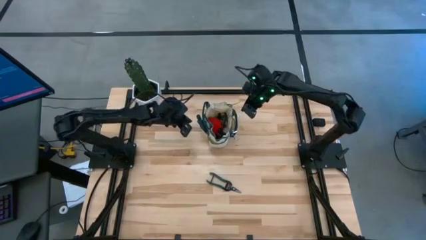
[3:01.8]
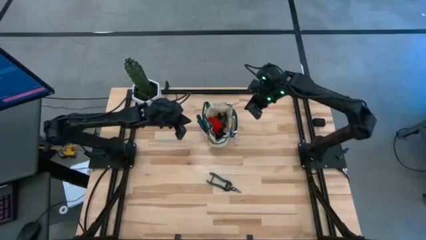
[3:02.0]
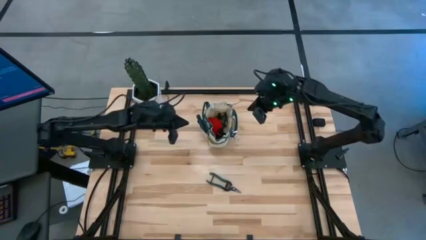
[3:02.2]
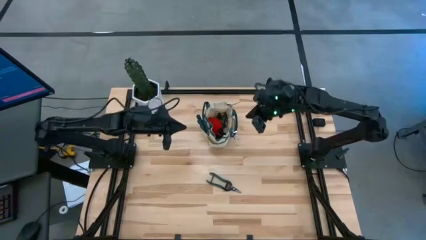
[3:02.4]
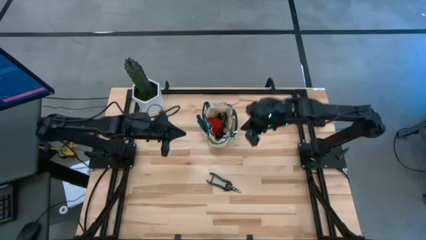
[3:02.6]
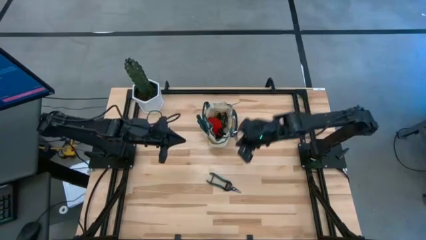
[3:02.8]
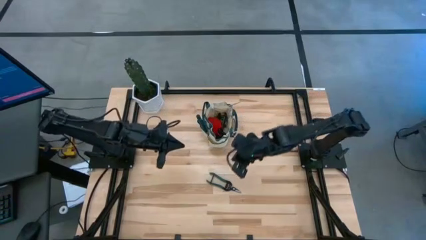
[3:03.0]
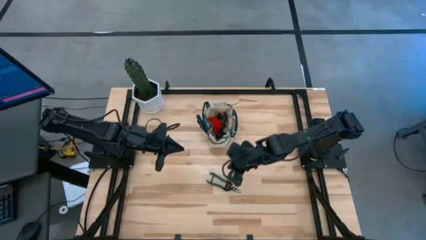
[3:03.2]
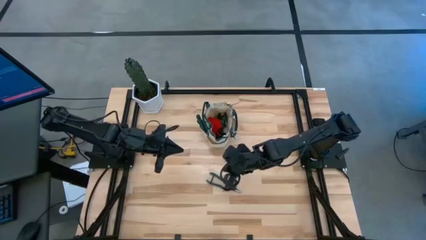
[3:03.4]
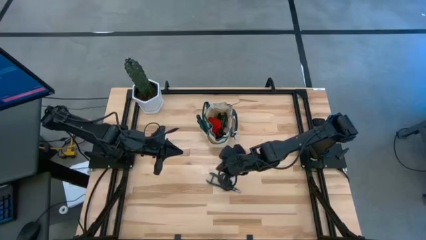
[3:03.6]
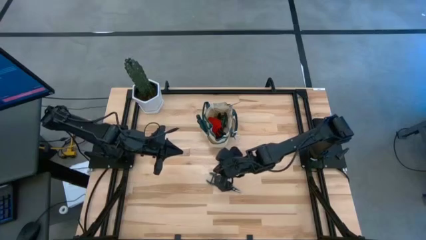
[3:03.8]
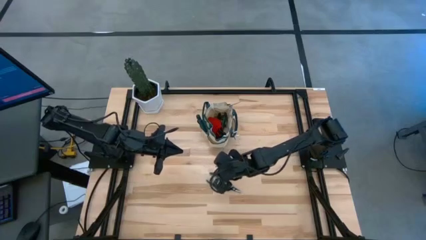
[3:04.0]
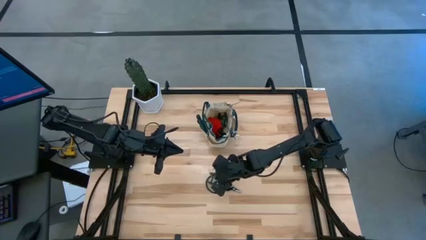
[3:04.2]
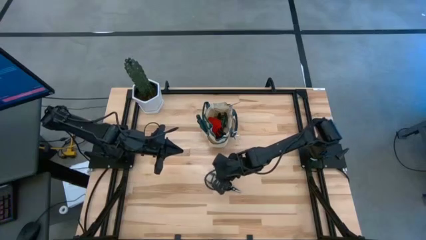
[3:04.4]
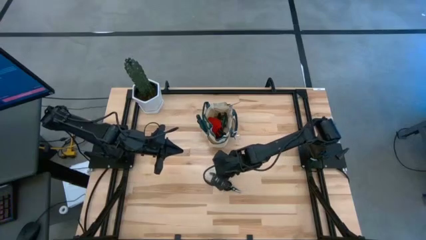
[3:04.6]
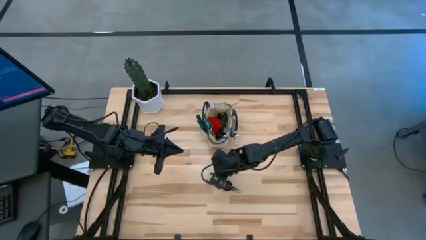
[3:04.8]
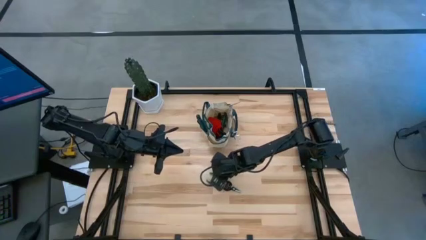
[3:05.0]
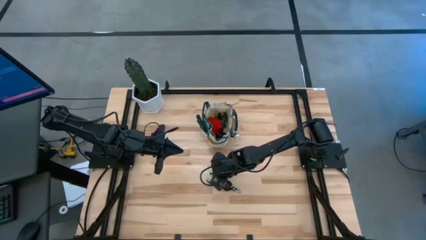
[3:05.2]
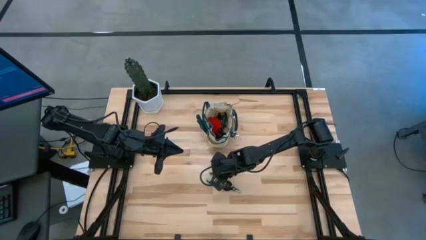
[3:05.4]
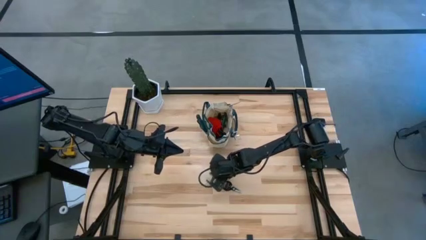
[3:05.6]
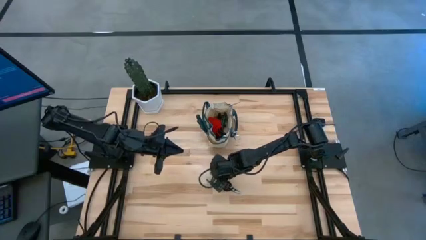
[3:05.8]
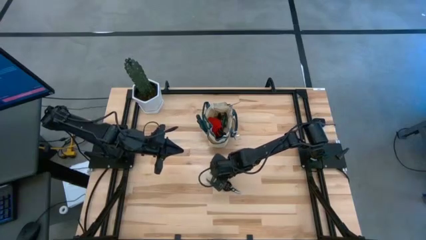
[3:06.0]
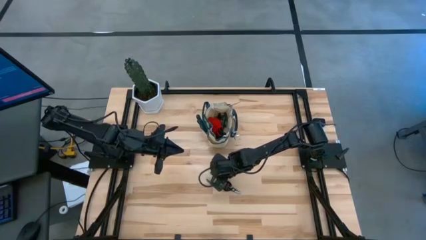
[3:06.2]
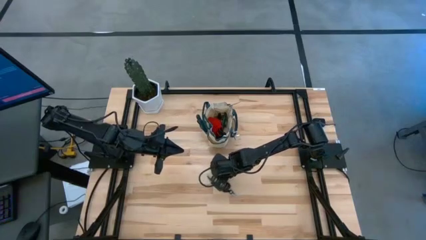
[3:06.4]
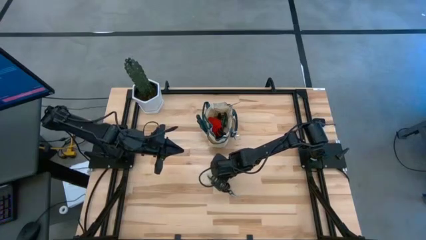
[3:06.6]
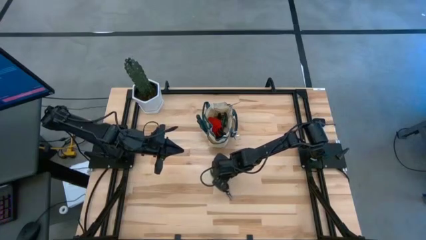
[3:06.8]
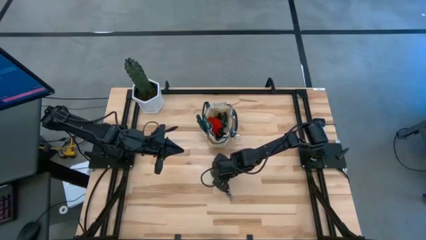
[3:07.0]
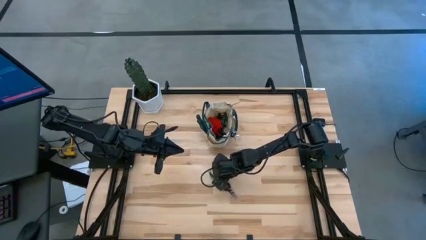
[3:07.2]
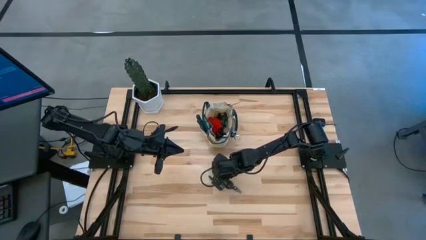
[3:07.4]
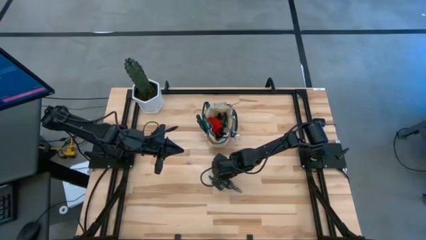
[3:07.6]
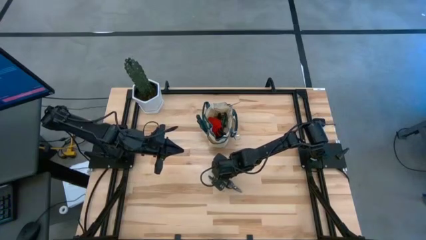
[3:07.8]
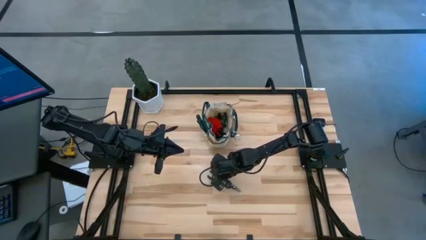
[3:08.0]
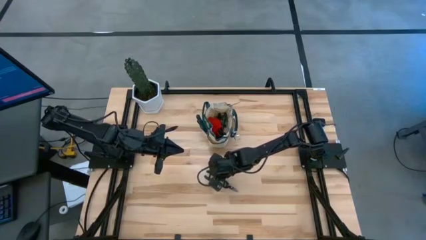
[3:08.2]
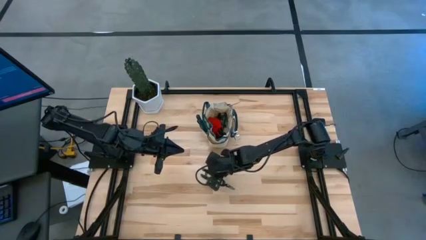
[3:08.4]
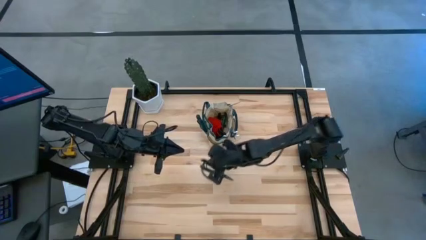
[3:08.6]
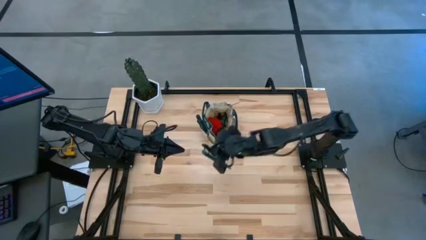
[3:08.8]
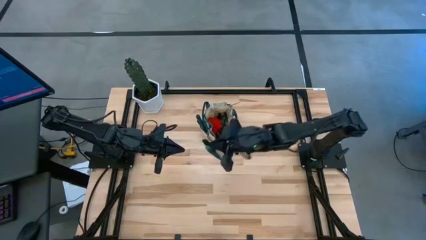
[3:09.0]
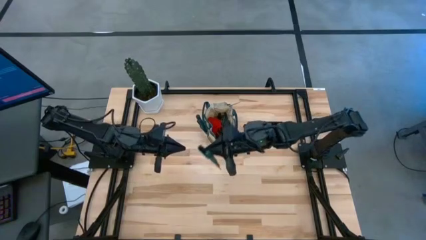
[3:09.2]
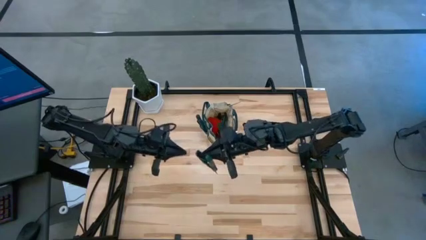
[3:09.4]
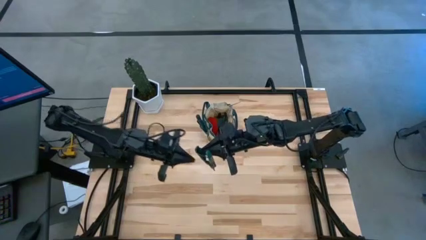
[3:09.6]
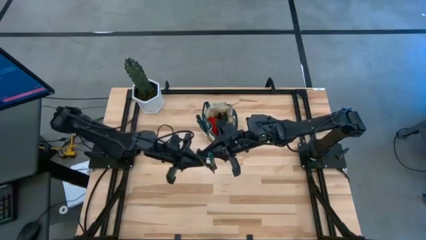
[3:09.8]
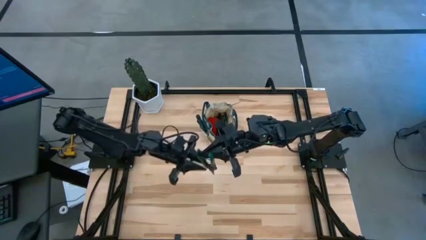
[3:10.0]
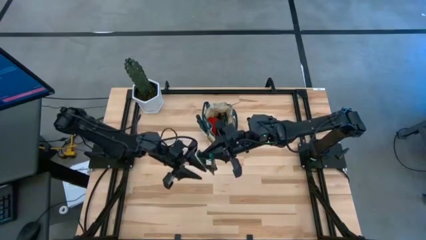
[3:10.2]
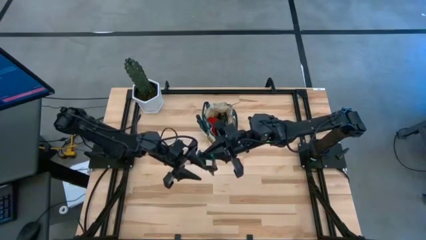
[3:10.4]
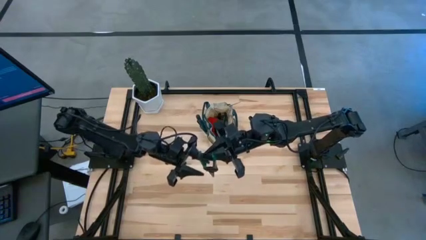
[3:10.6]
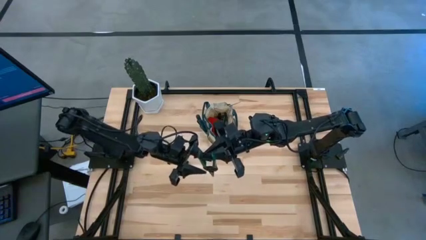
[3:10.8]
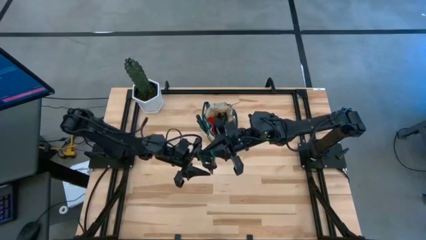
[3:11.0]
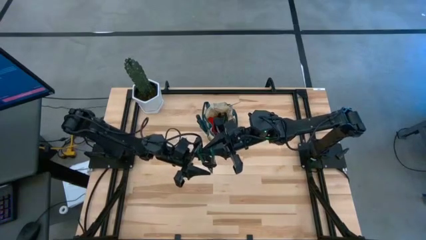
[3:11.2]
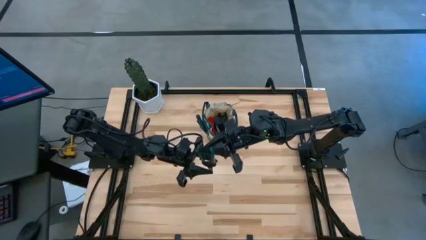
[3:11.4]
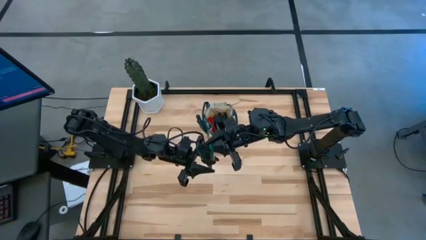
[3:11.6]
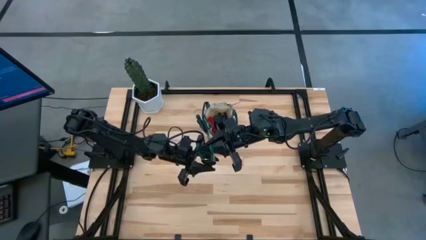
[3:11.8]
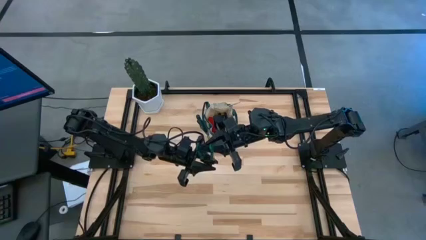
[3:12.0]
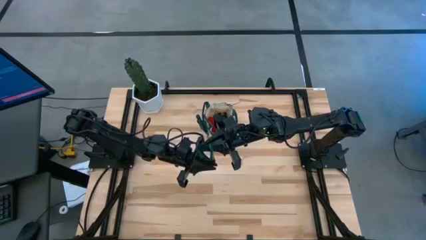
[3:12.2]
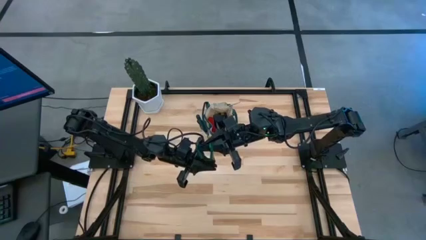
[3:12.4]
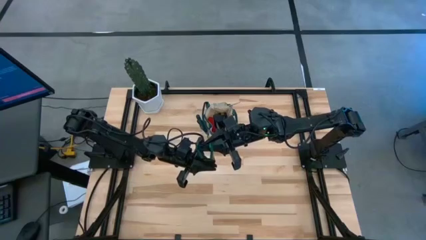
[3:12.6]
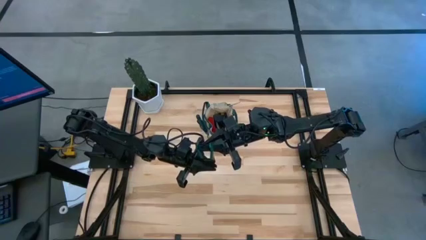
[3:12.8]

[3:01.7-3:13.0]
Task: Pick & Place Garden tools in Gardening bag
Put the garden pruner into the side pocket of the gardening bag

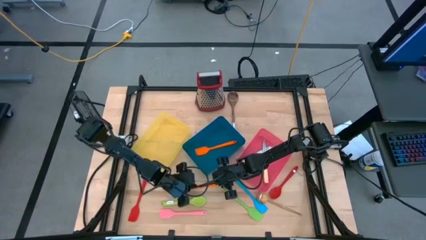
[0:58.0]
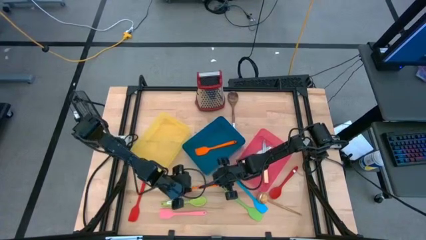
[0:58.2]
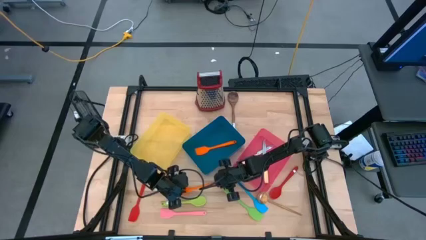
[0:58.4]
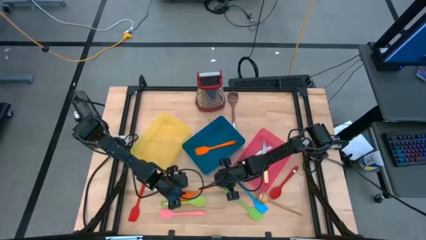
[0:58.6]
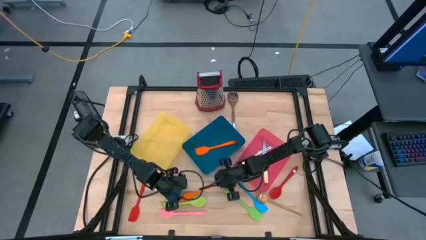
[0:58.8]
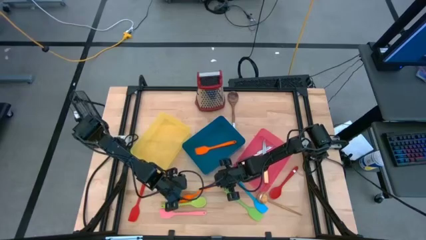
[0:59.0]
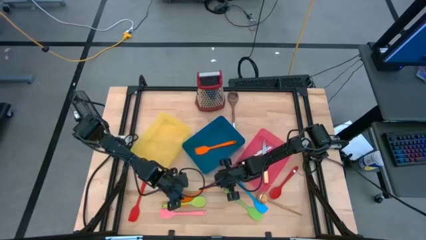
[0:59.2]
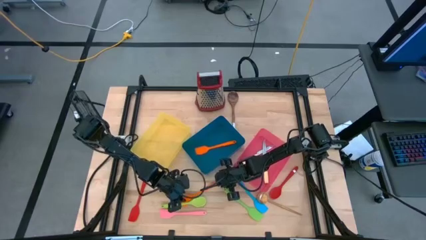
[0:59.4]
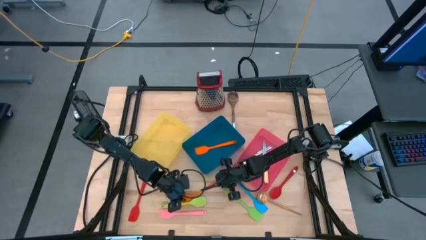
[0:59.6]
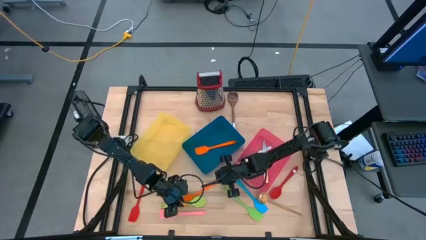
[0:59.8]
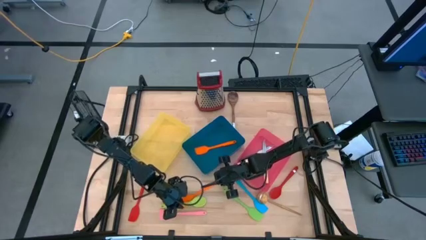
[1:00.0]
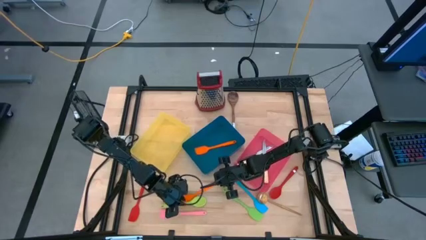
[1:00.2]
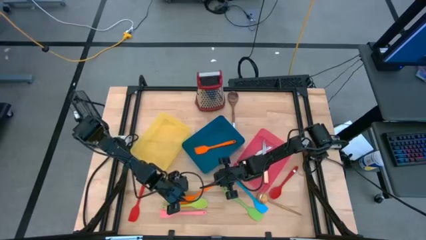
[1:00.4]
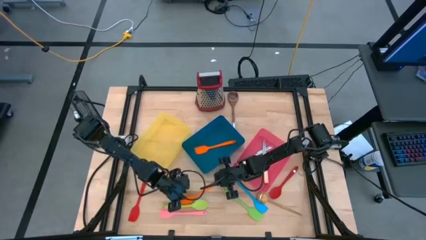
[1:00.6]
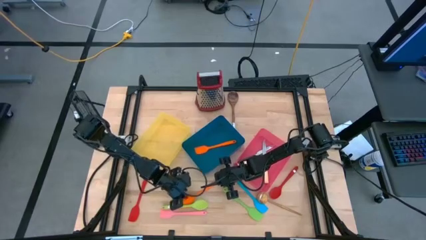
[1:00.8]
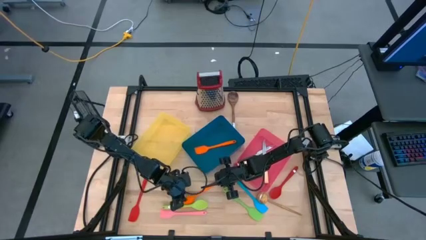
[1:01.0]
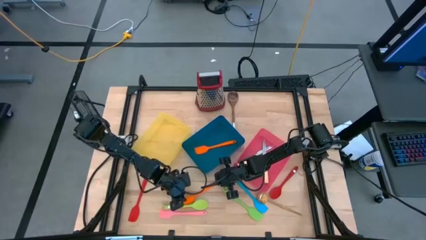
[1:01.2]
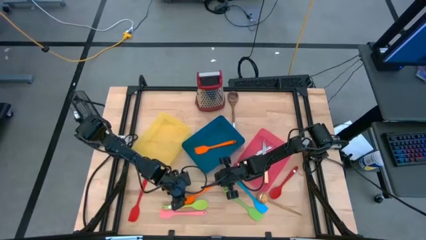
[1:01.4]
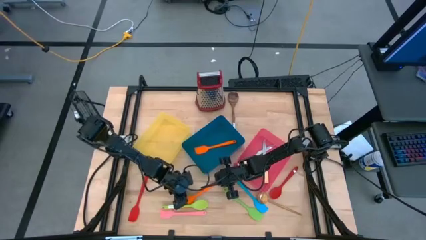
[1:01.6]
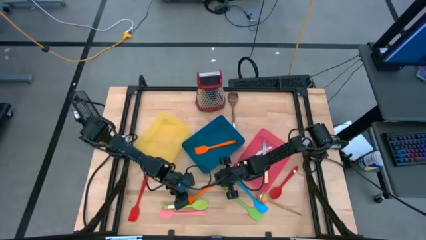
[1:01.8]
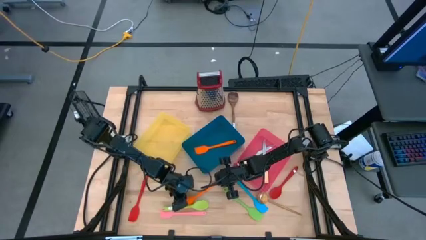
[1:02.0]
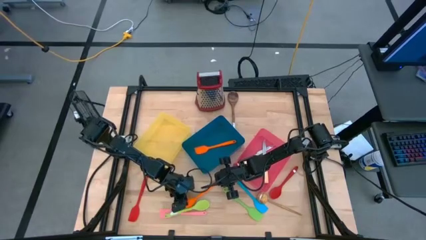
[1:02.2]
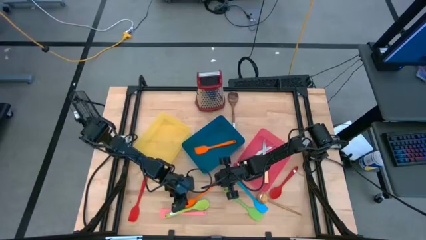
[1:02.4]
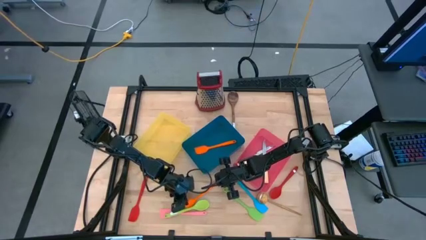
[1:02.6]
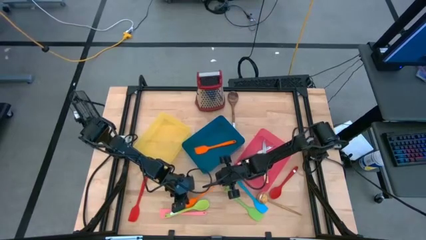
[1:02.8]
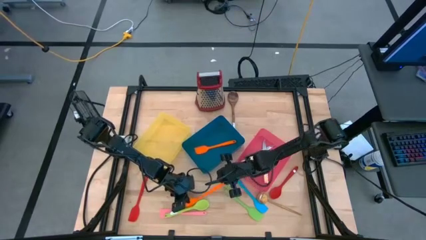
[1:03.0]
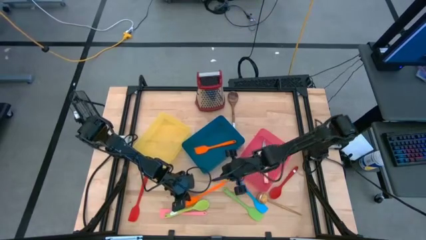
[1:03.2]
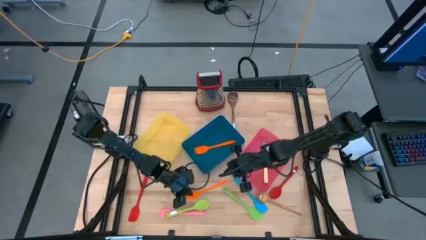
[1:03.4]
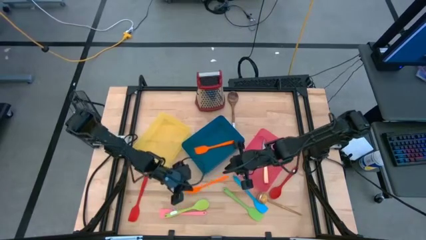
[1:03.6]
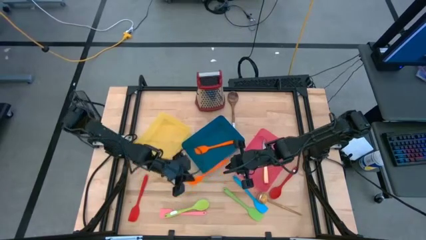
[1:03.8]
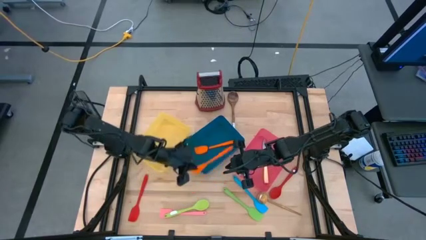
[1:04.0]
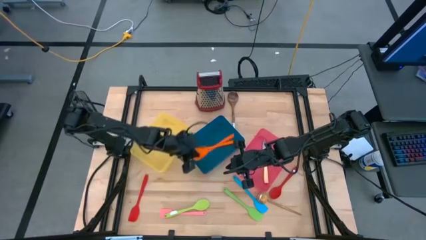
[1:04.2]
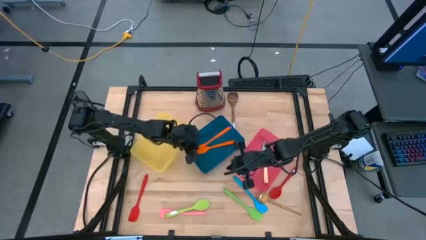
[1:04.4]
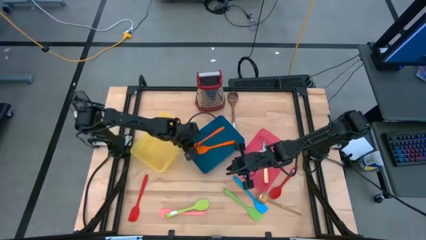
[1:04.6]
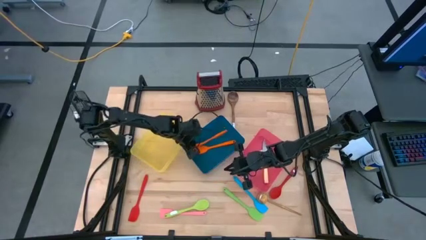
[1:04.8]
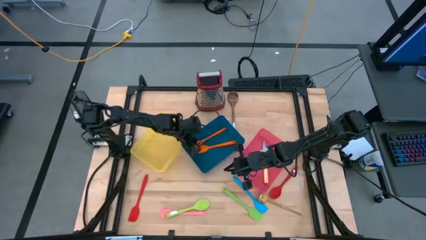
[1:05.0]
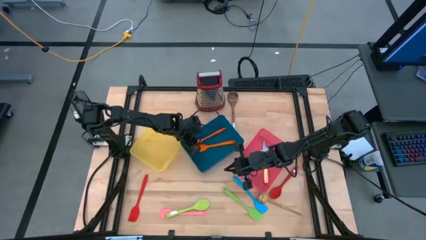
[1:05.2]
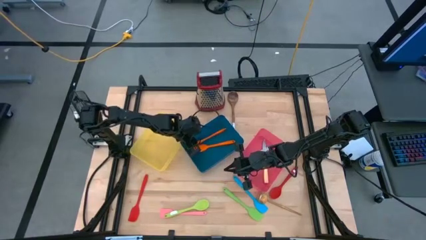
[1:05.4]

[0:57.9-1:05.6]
Task: Pick & Place Kitchen Items
Put the orange spatula into the blue bin
